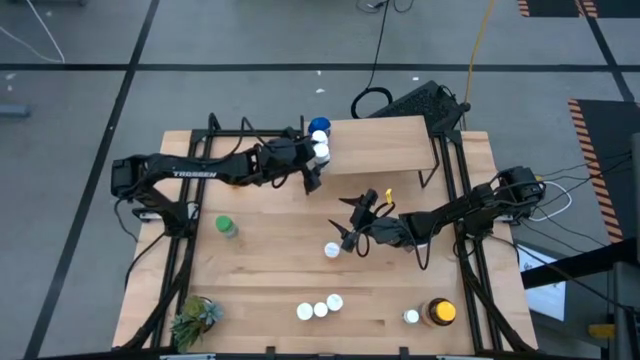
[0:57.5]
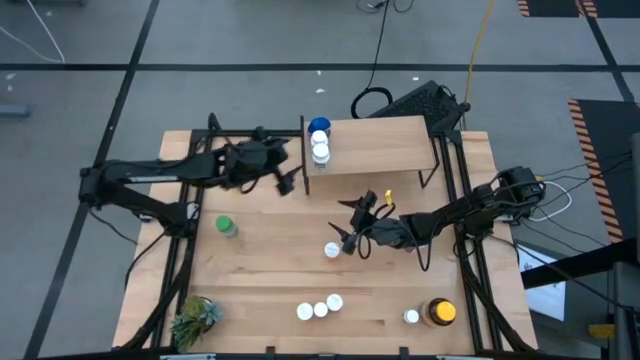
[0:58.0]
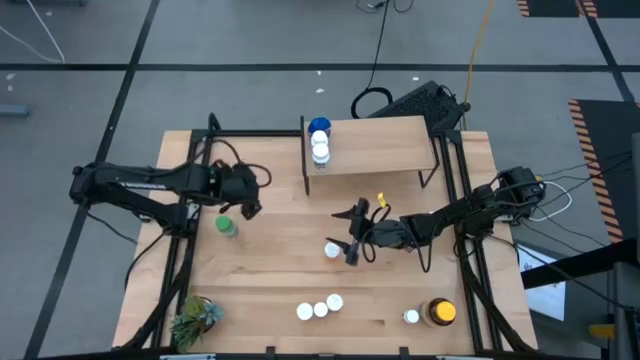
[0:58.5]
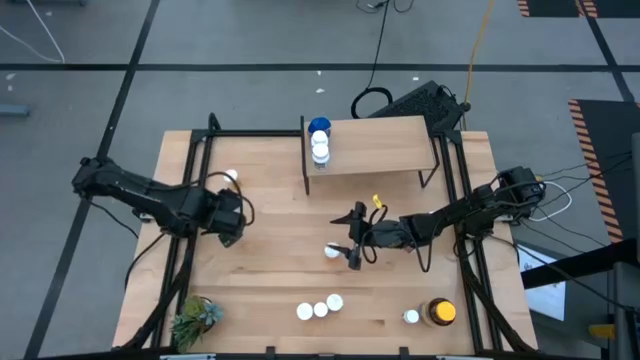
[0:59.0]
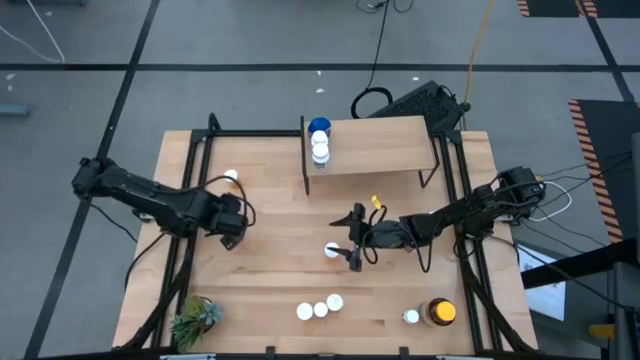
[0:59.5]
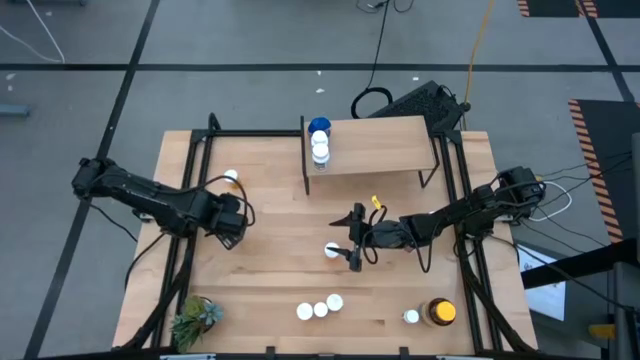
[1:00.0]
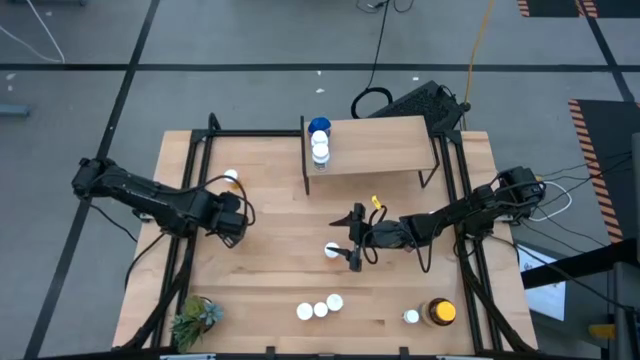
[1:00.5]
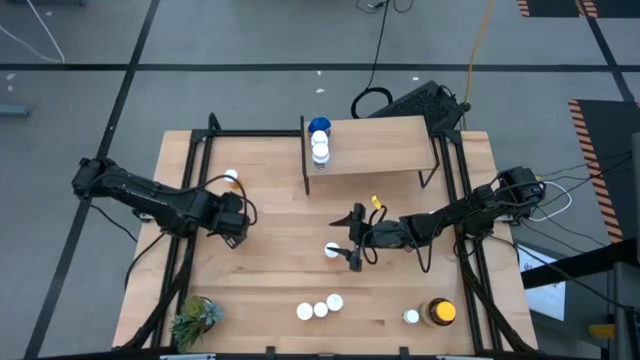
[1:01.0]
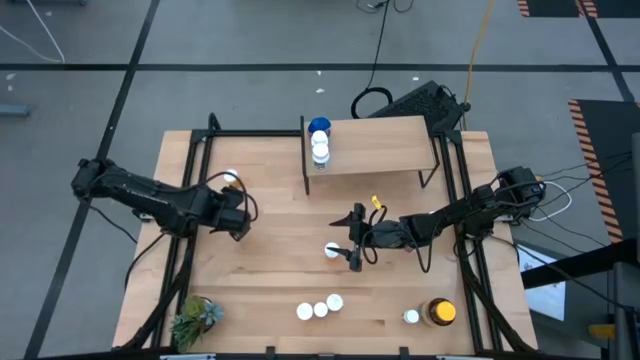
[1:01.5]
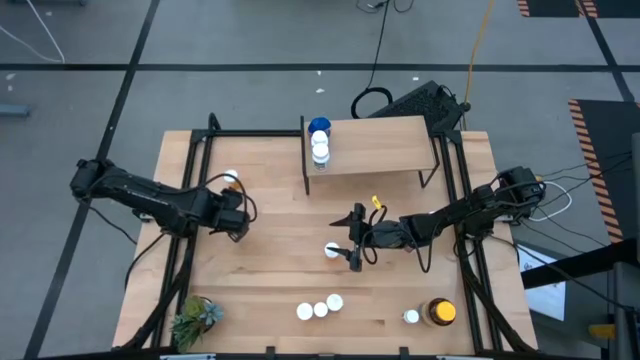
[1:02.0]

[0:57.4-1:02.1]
Task: Pick and place medicine bottles onto shelf by color
Put the green bottle on the shelf

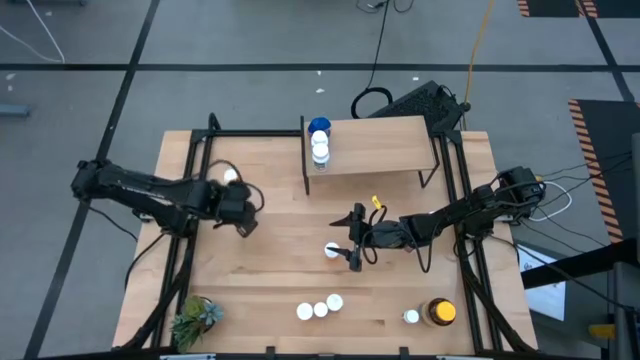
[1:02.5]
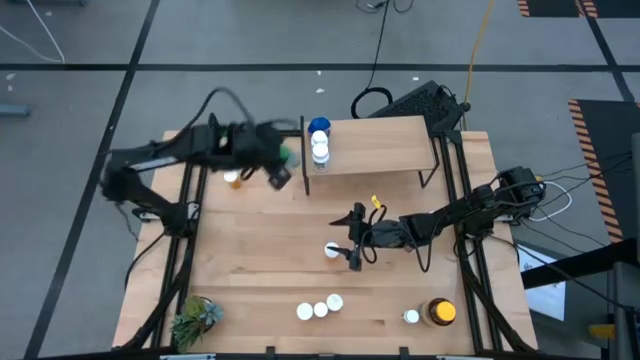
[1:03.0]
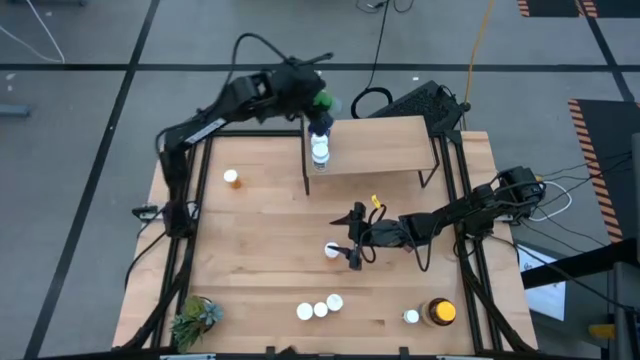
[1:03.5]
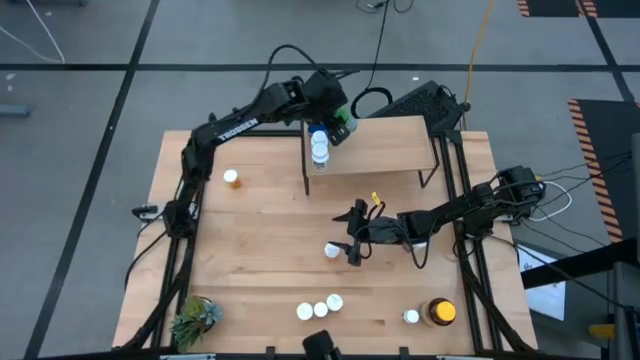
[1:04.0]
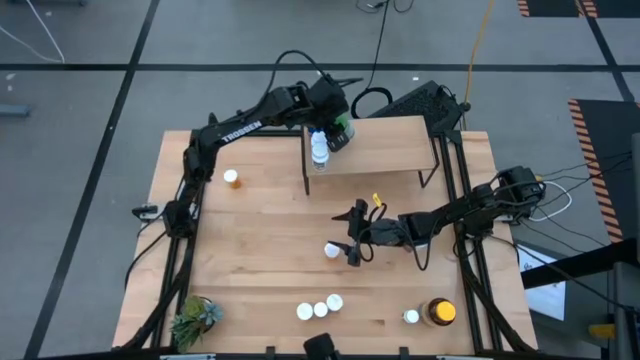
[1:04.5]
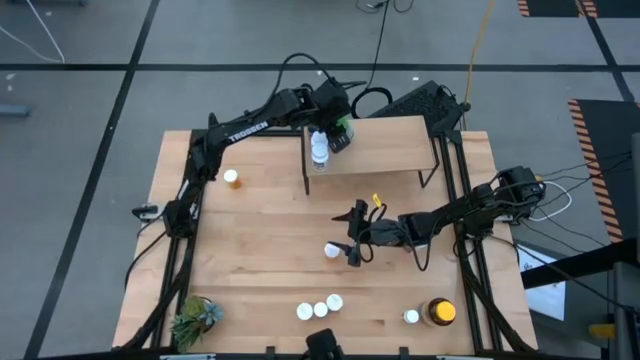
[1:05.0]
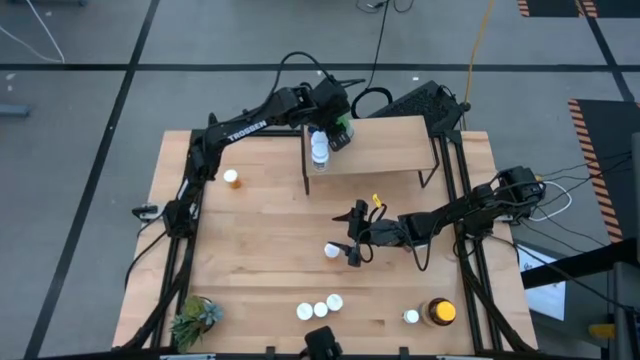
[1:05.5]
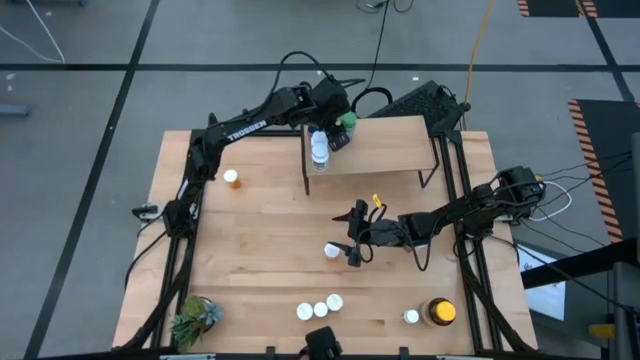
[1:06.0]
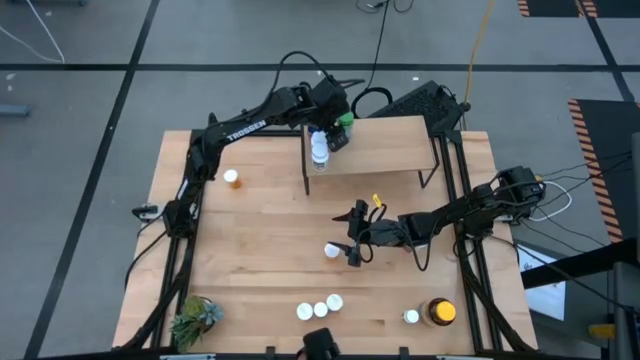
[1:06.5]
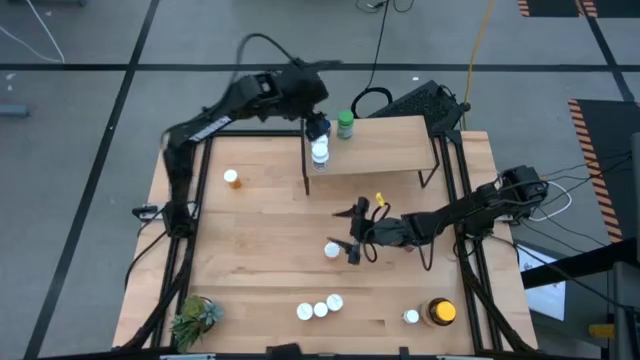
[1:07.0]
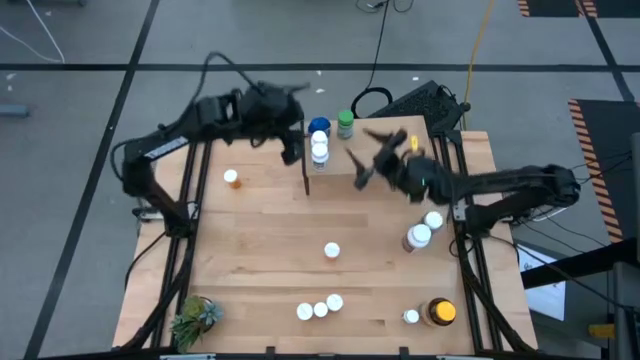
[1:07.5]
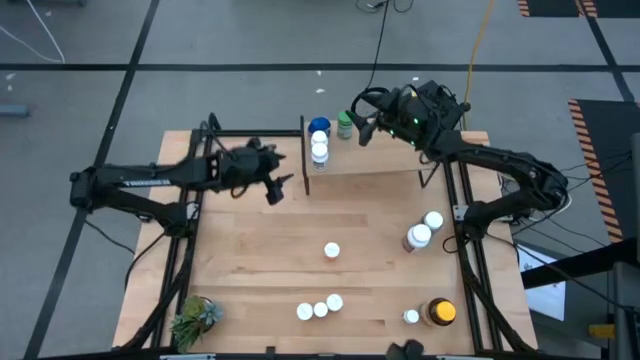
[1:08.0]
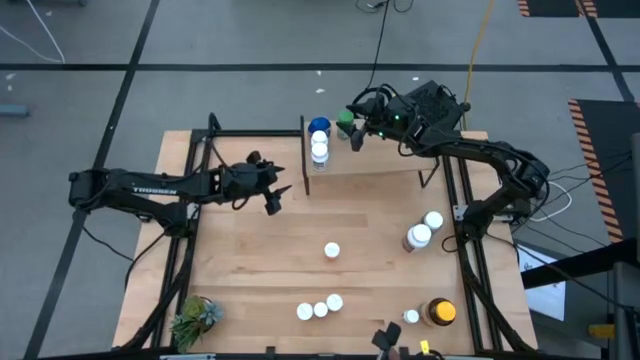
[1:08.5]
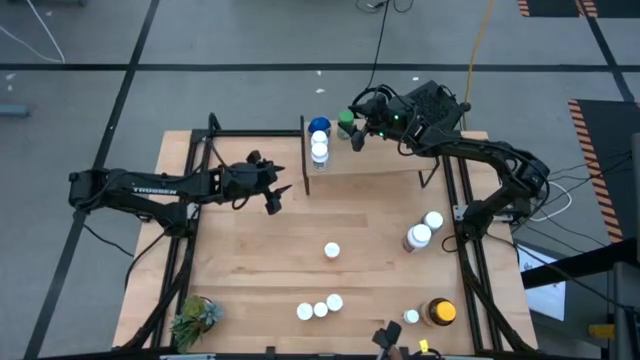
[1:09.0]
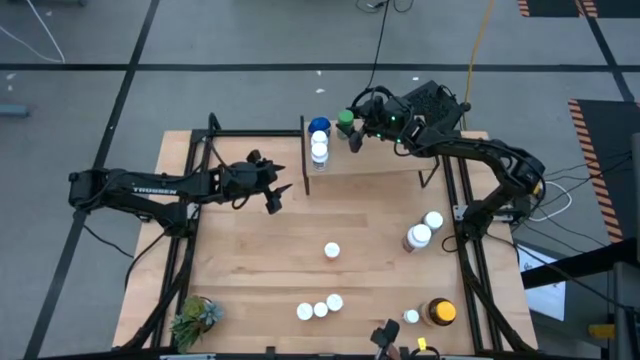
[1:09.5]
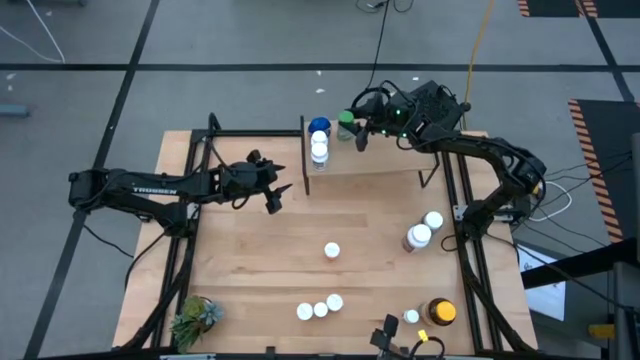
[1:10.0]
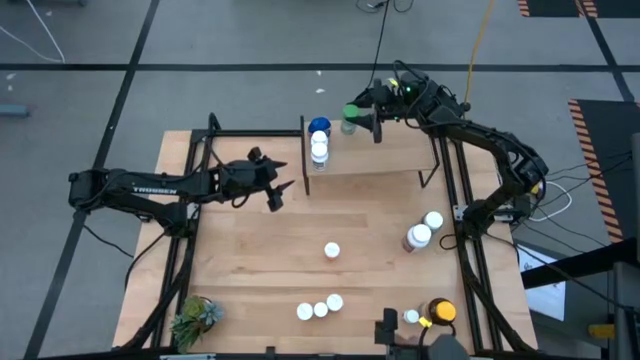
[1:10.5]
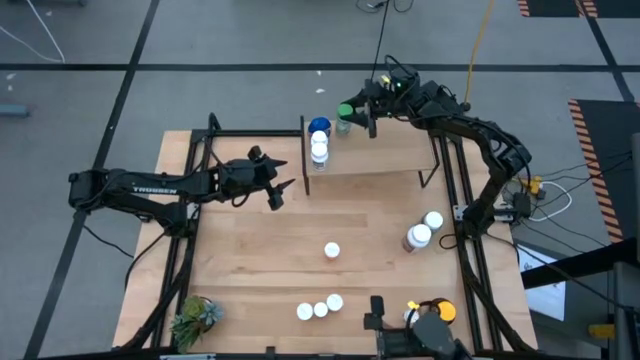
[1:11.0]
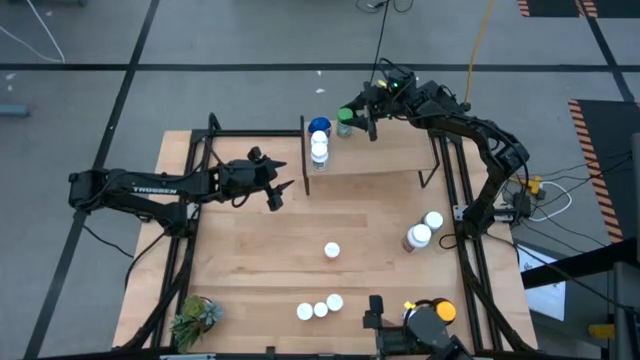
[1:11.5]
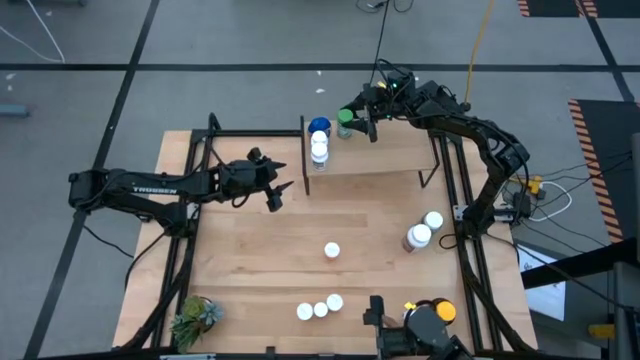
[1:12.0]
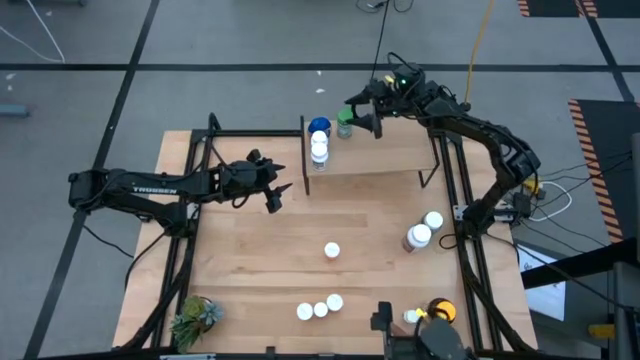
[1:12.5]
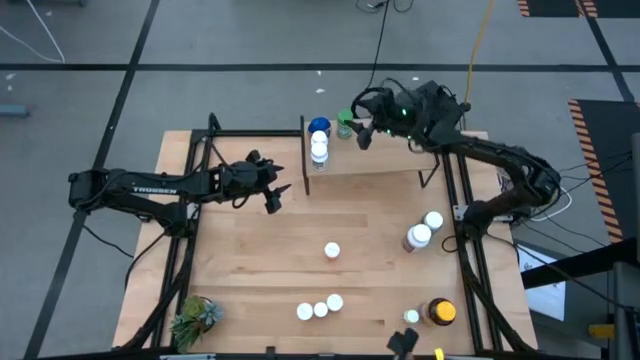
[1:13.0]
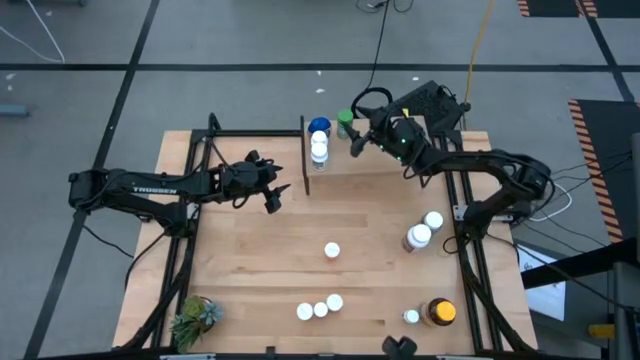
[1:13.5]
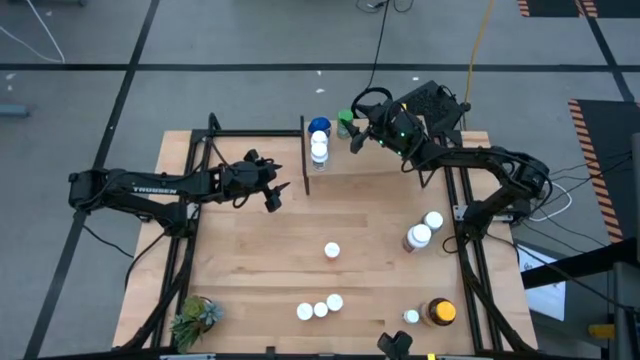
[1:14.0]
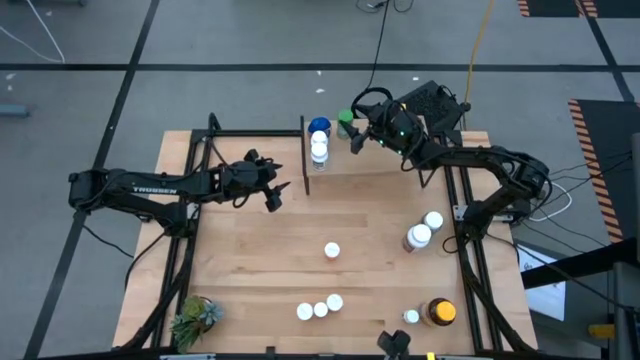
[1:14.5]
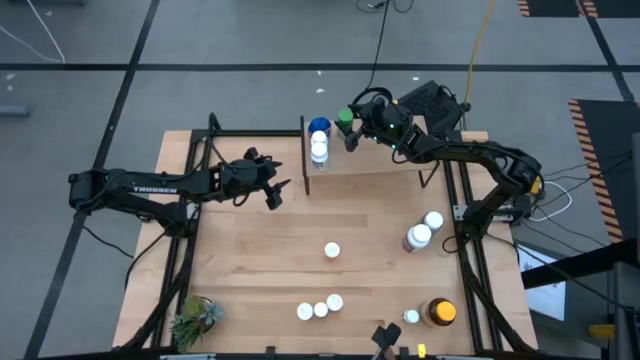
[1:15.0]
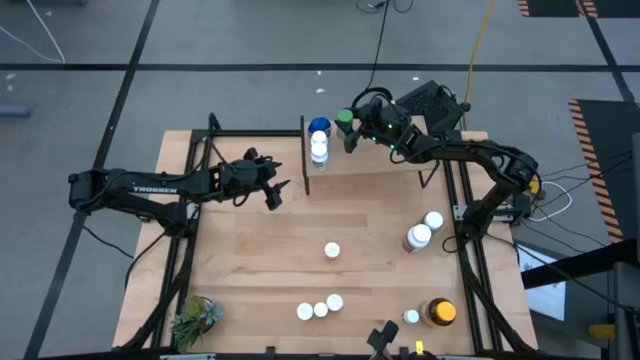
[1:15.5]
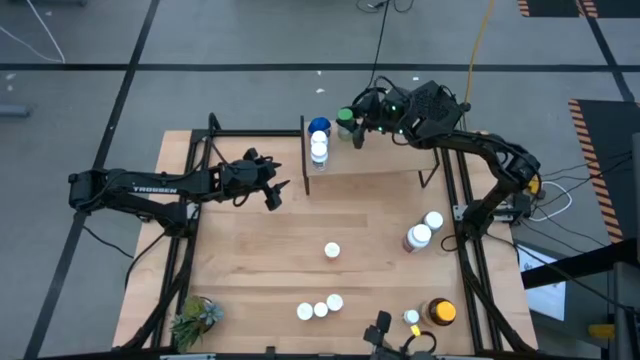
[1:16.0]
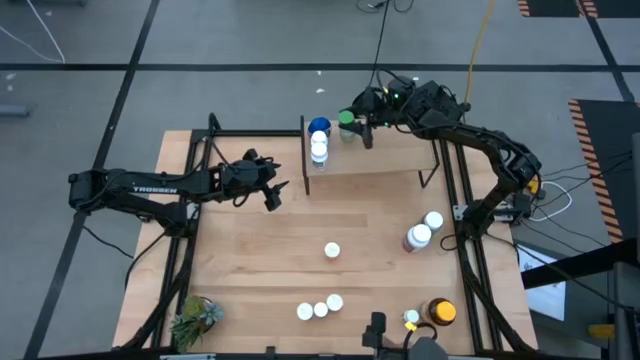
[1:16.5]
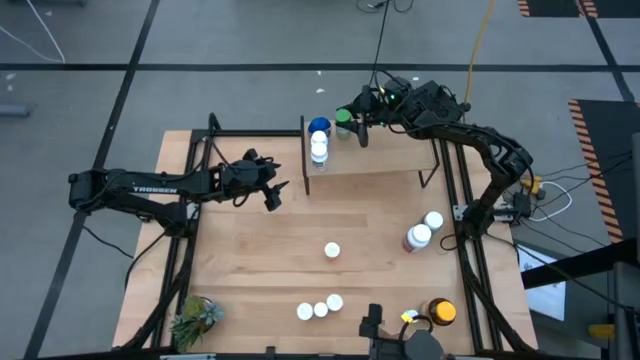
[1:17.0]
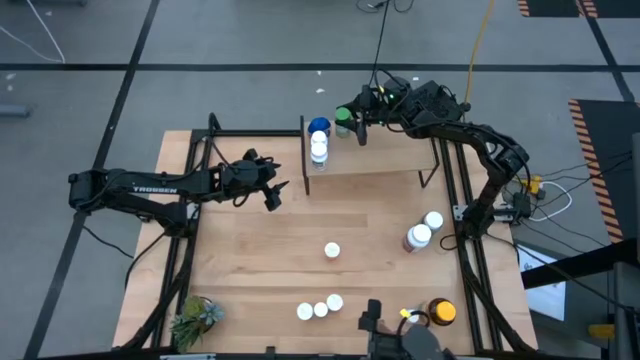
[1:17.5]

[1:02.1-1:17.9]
Put the green bottle on the shelf

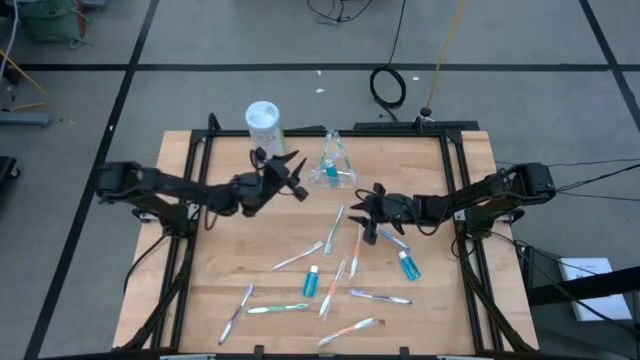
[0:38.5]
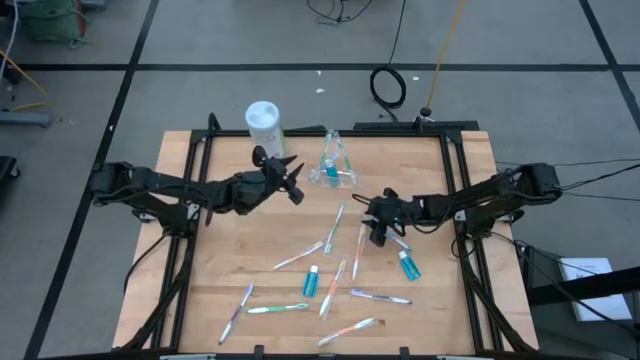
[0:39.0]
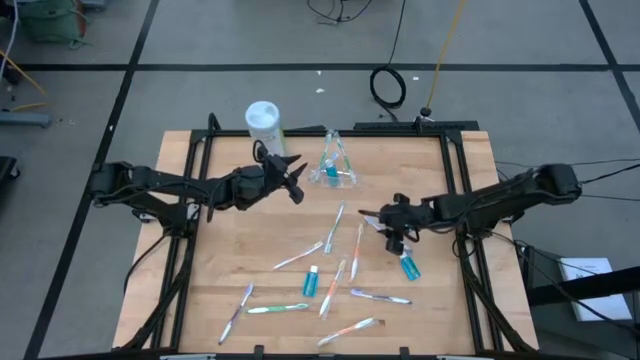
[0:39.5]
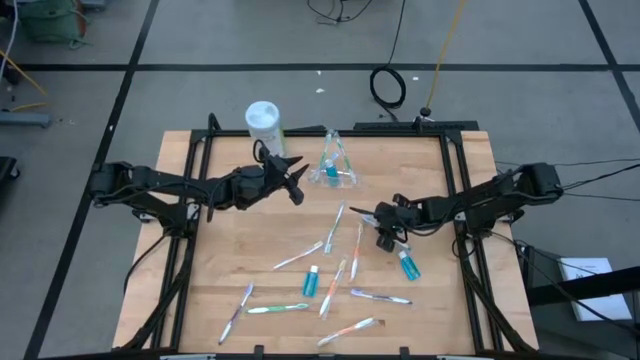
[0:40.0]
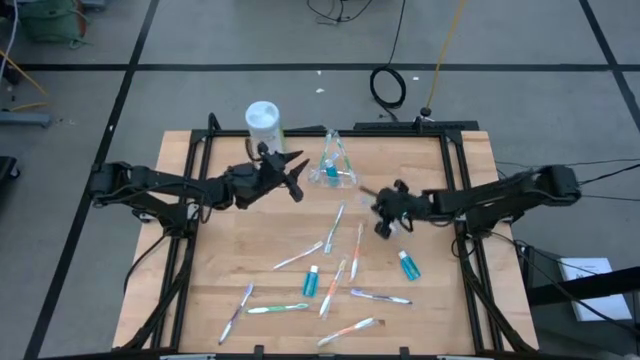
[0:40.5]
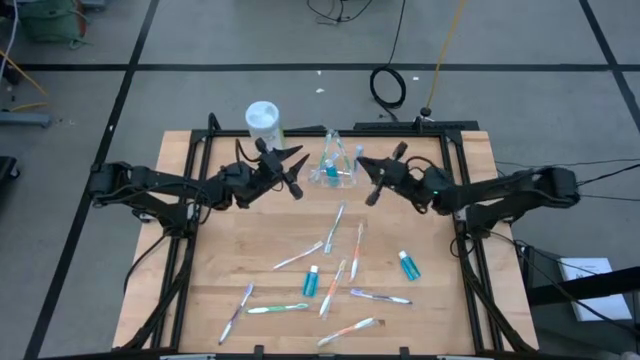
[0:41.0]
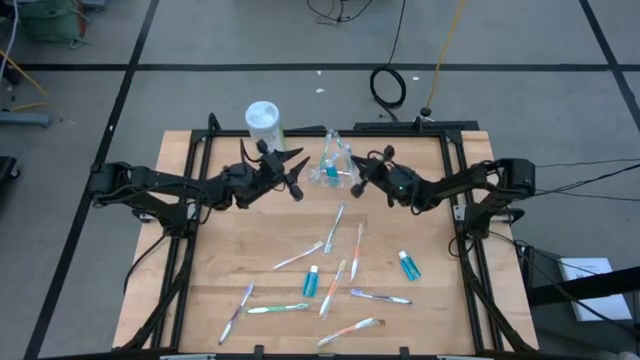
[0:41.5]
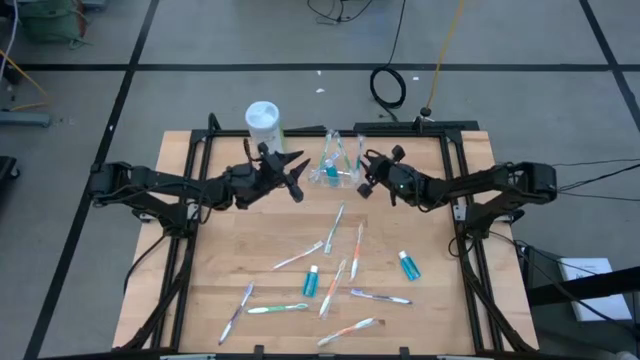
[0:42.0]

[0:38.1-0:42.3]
Task: Pick & Place toothbrushing station
Put the blue toothbrush into the transparent organizer
